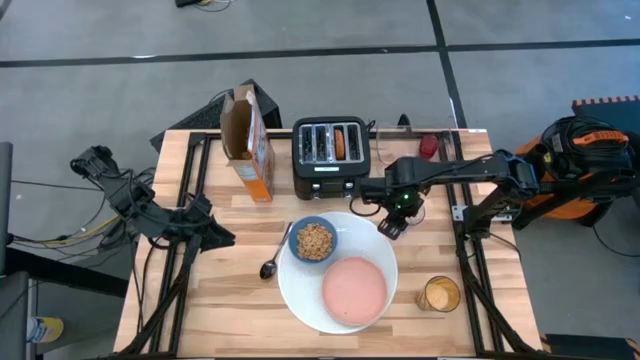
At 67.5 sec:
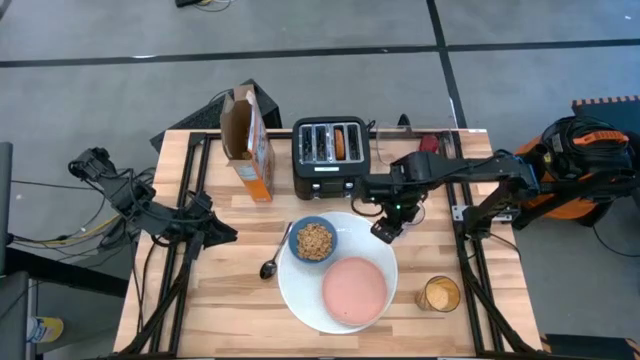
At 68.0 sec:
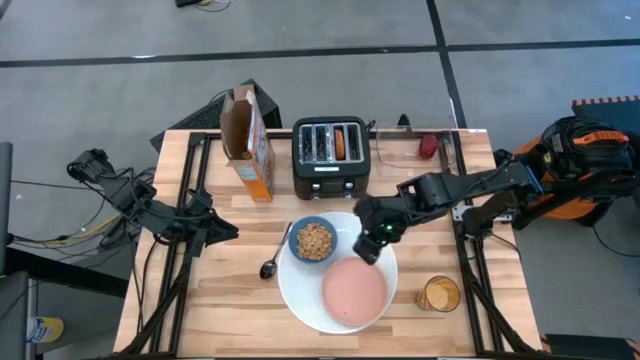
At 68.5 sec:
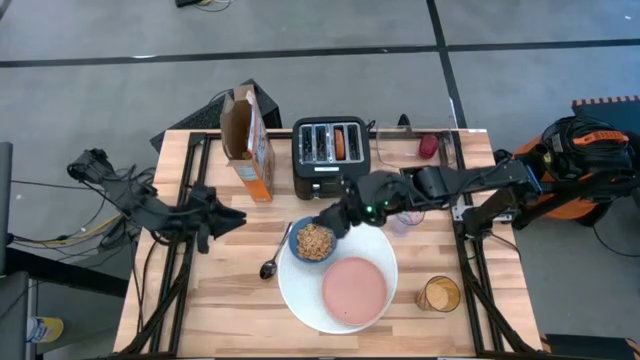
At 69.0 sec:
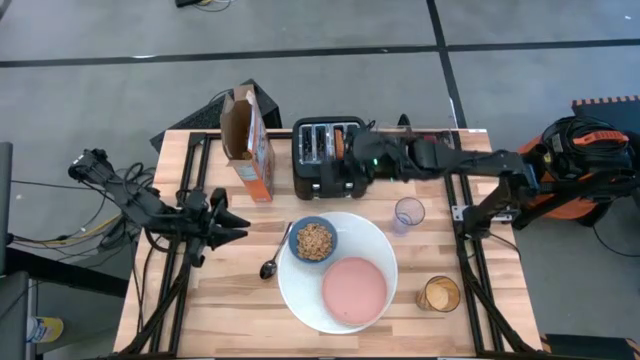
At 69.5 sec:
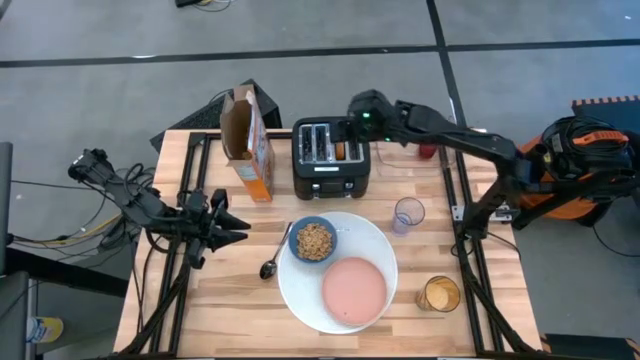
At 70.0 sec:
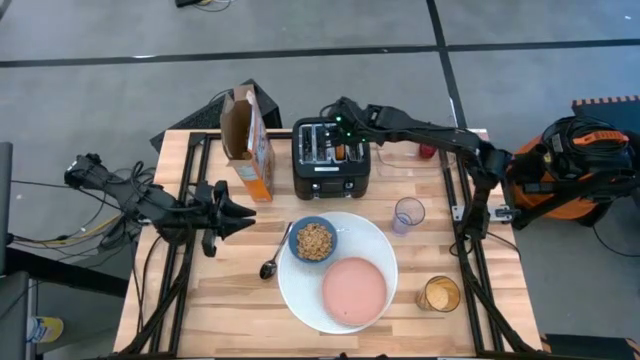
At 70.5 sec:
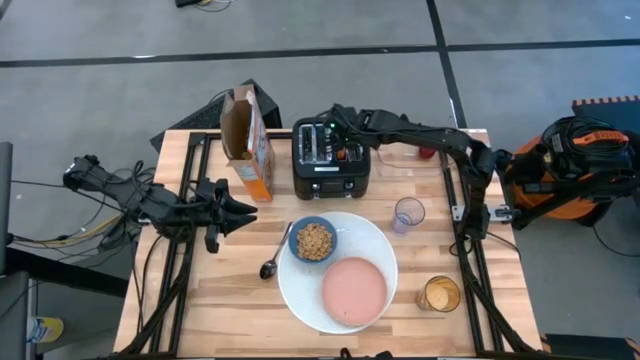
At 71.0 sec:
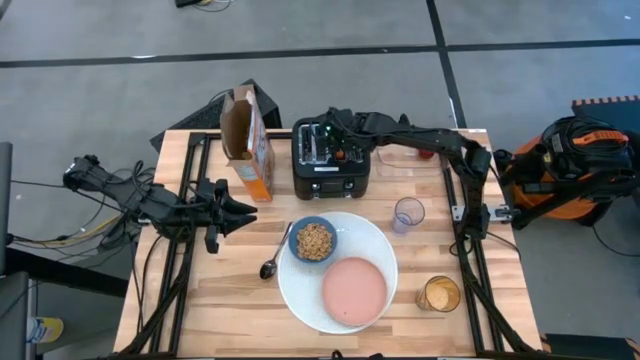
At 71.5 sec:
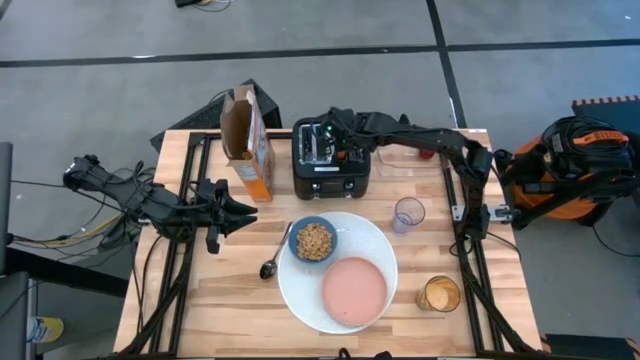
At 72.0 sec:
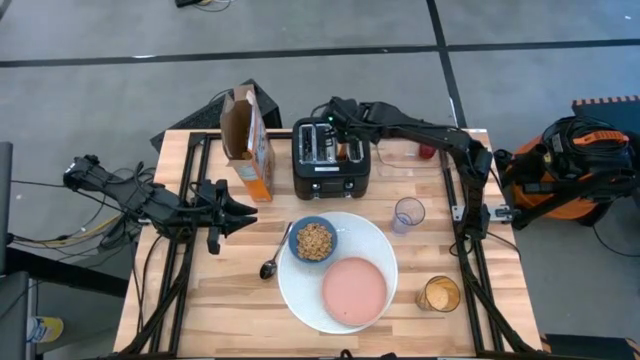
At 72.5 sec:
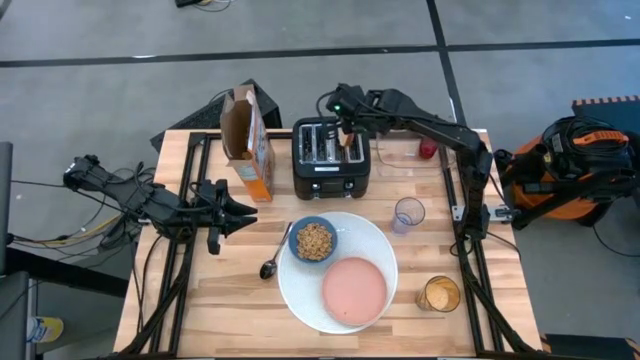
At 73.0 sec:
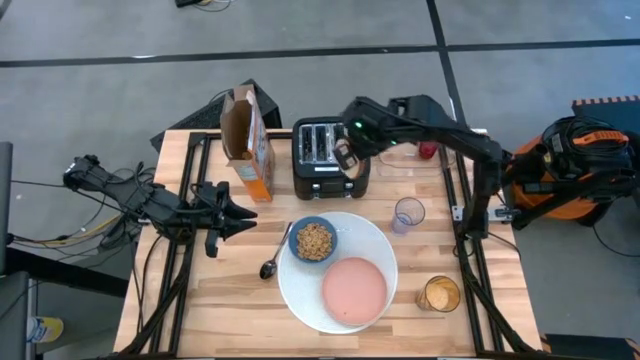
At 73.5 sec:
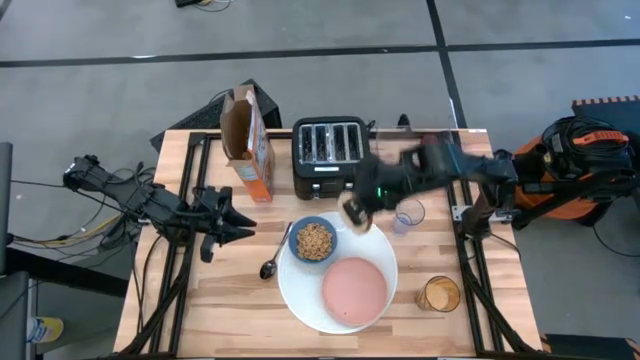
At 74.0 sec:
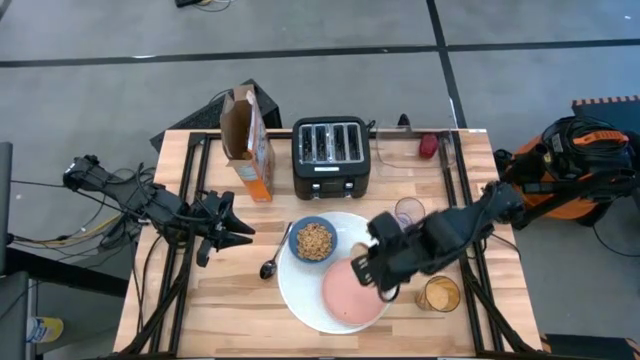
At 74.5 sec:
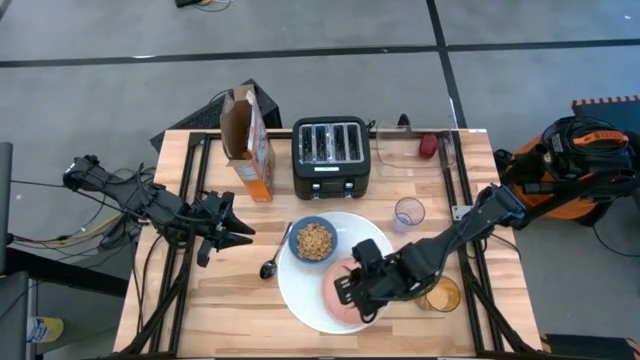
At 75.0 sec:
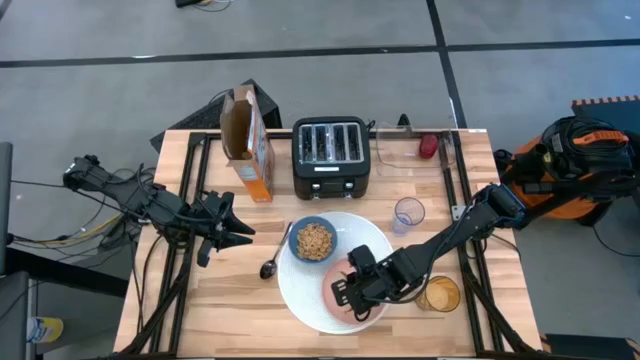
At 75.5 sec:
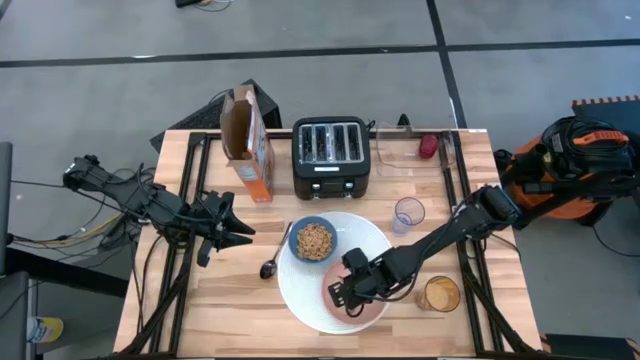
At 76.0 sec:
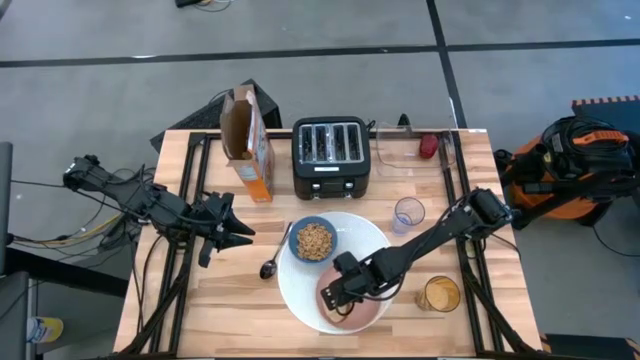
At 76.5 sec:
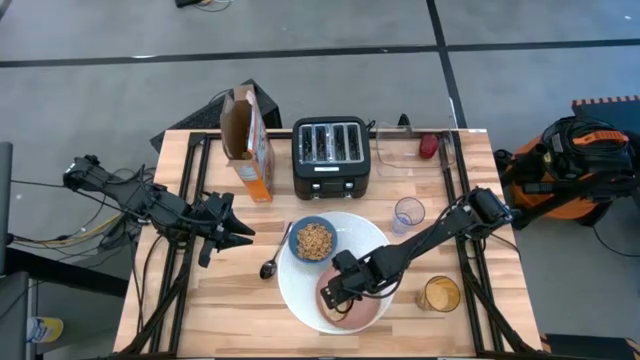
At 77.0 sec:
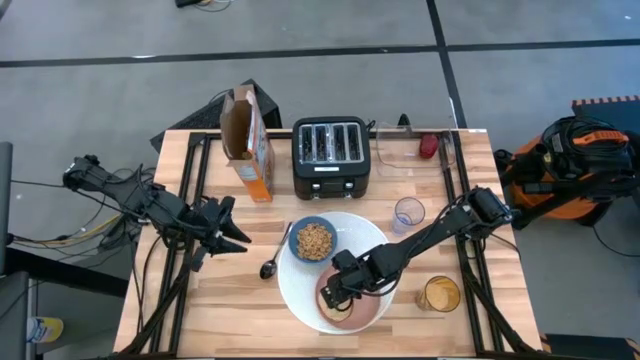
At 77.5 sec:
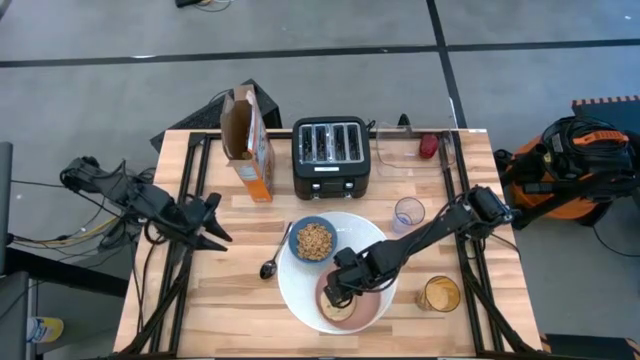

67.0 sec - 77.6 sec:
Task: Arrange a breakfast setting
Put the bagel on top of the pink plate

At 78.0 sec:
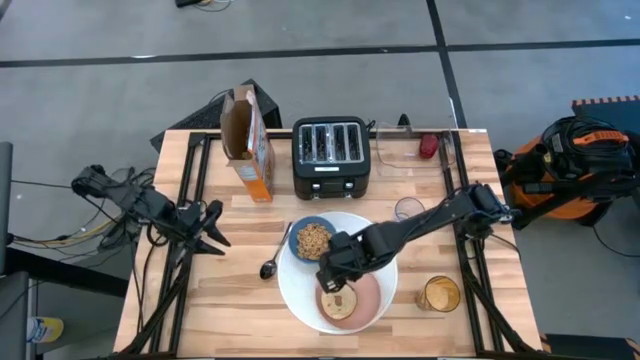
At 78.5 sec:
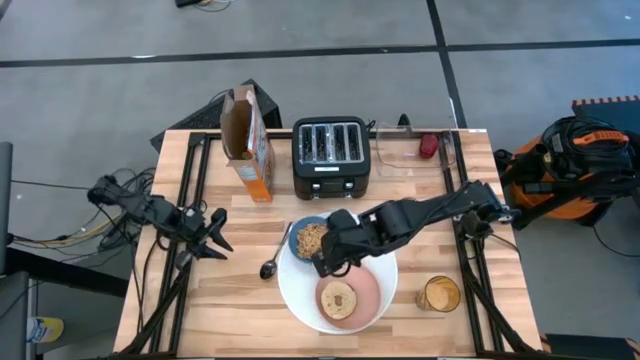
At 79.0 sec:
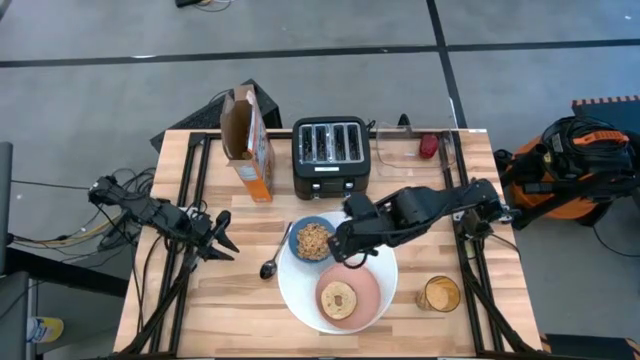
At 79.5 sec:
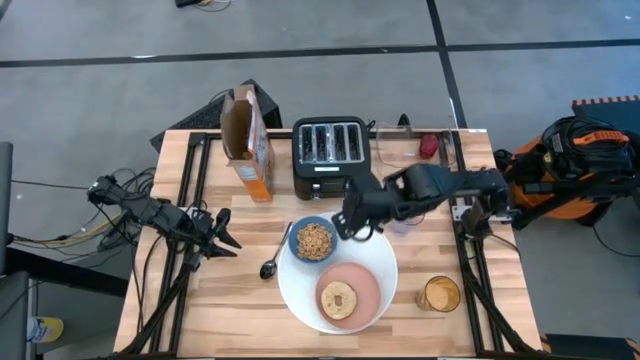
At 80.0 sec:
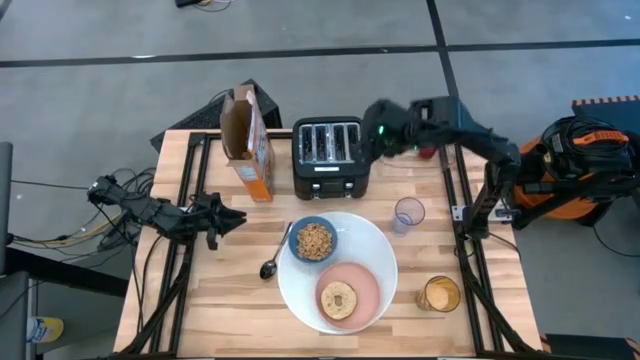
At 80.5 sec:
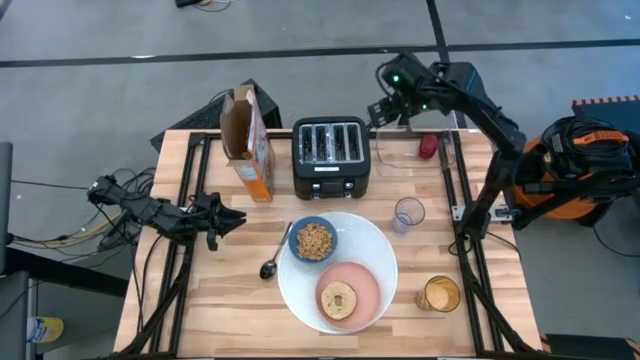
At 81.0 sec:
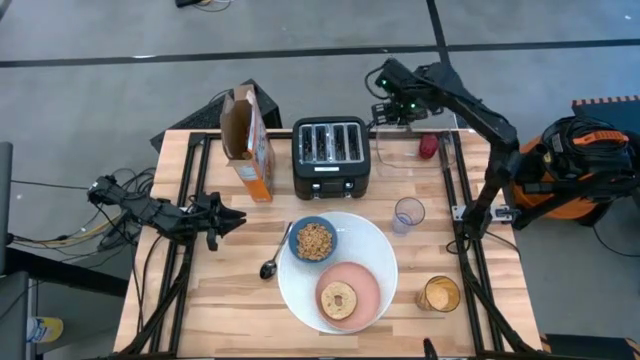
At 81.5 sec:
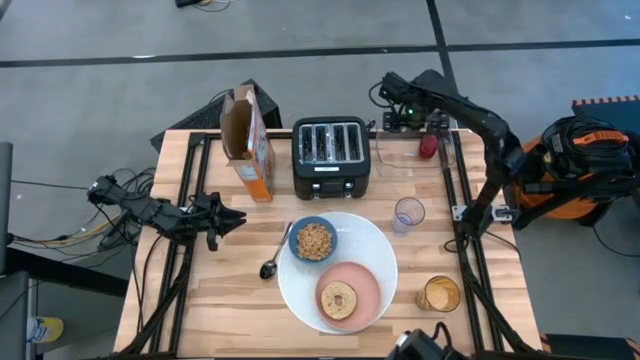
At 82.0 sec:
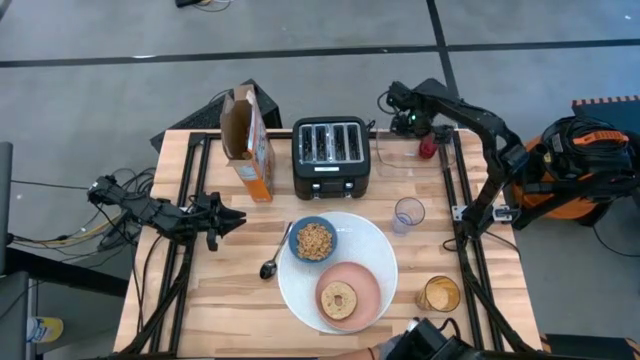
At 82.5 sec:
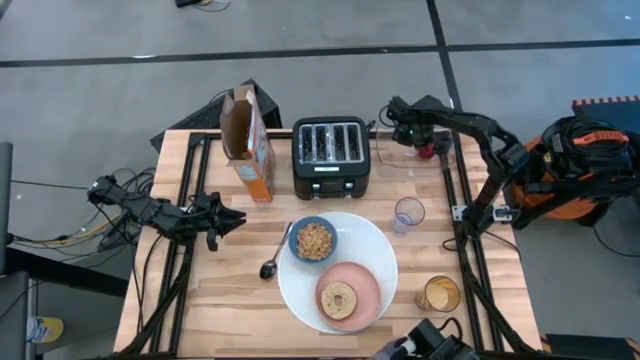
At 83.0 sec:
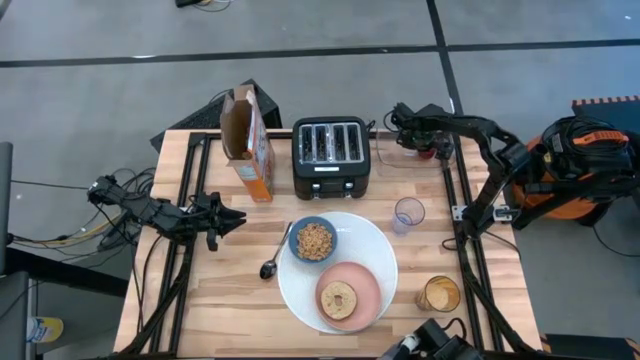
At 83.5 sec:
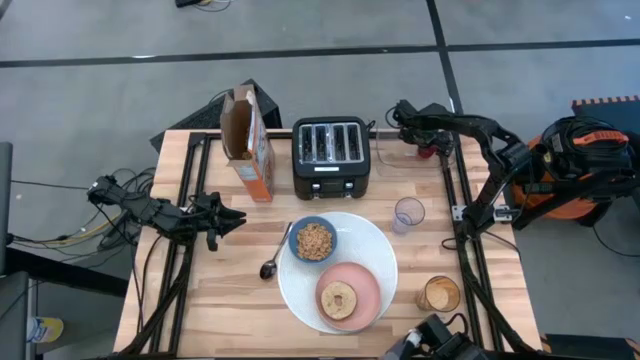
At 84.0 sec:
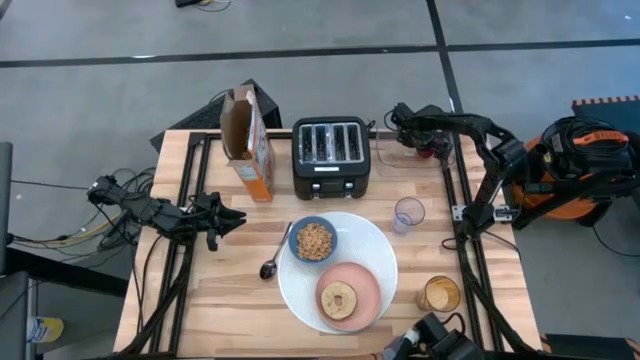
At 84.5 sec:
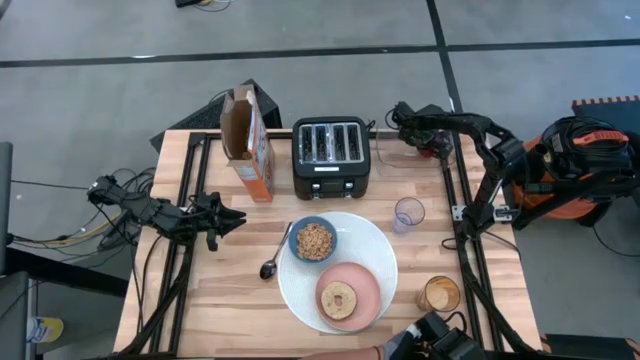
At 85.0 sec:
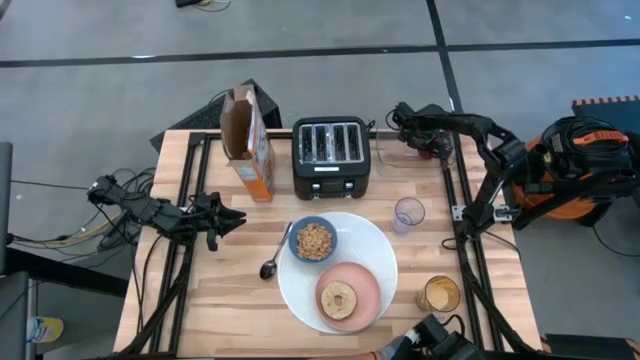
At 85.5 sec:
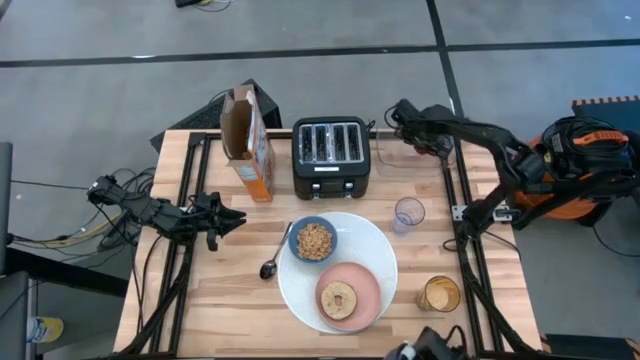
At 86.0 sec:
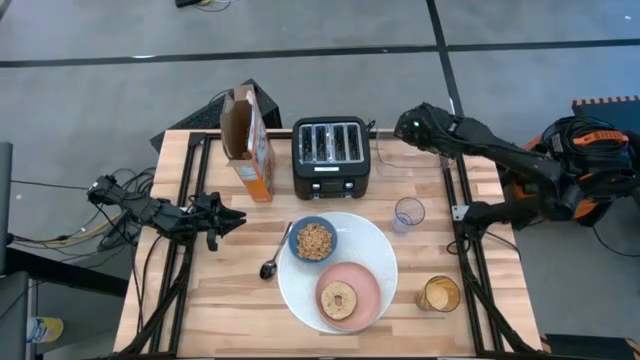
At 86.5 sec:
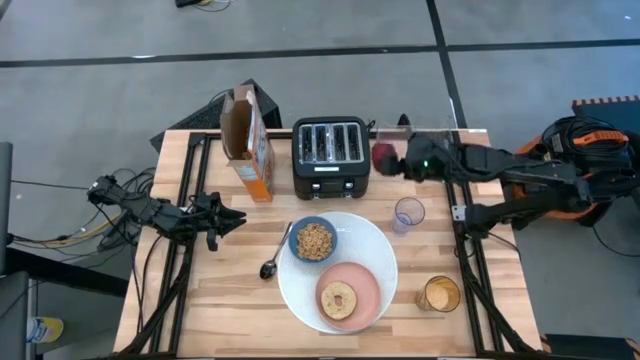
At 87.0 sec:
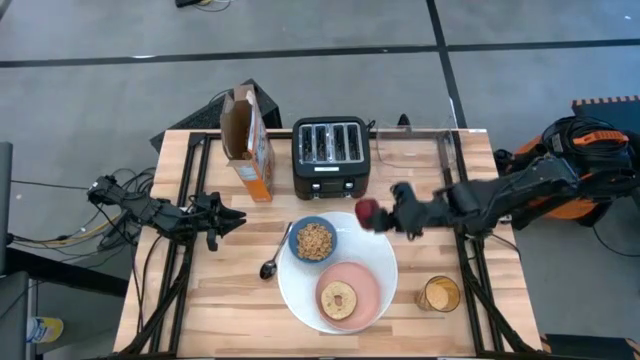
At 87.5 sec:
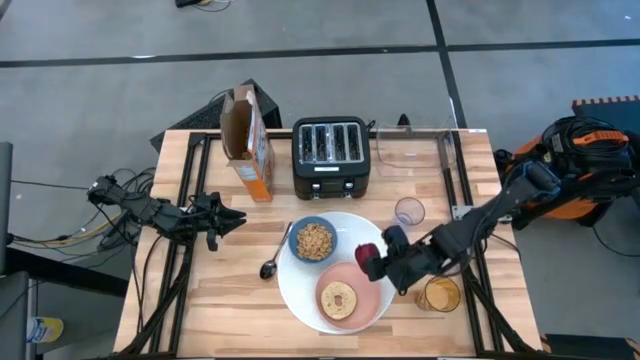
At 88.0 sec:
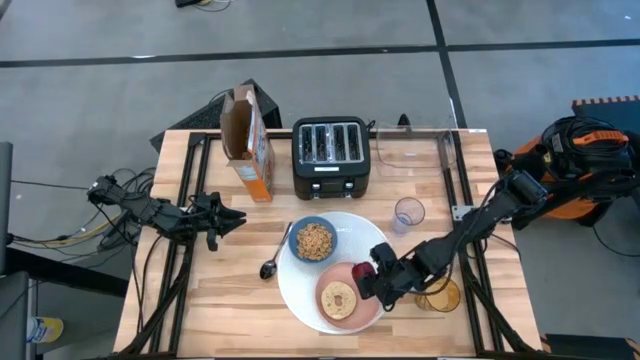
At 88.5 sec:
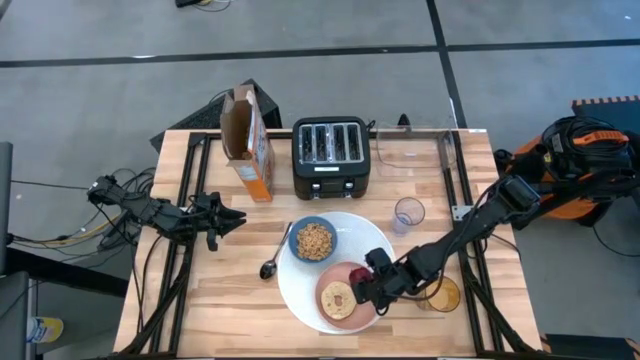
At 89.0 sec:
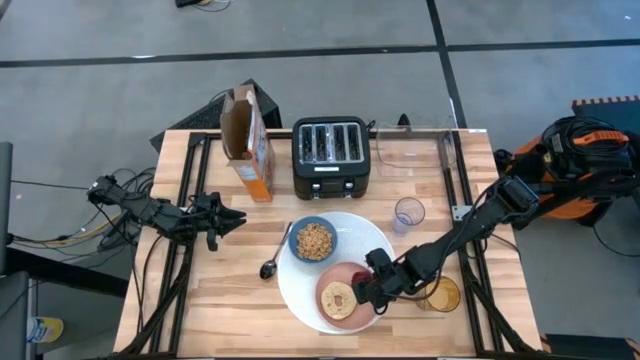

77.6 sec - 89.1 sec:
Put the apple on top of the pink plate
